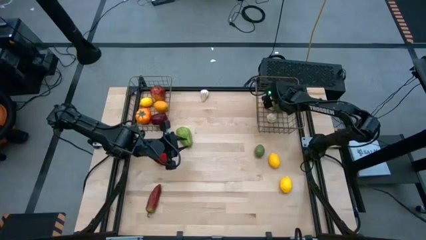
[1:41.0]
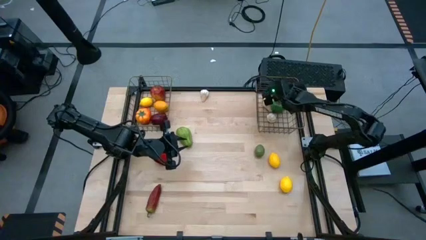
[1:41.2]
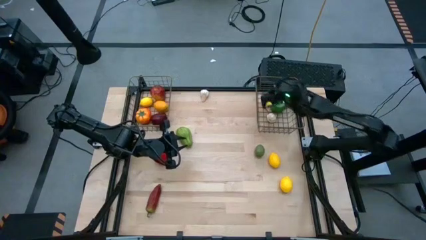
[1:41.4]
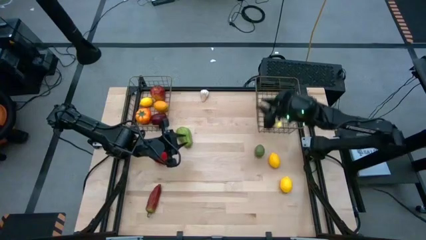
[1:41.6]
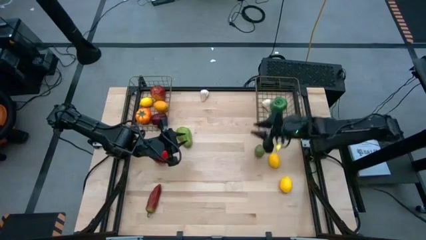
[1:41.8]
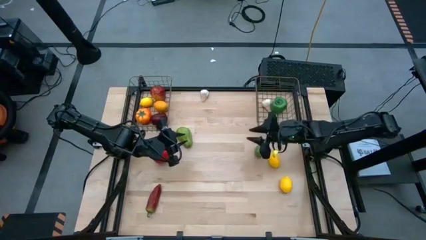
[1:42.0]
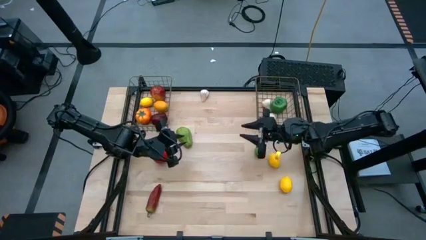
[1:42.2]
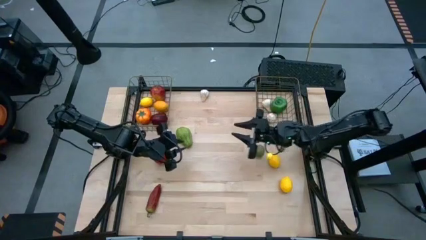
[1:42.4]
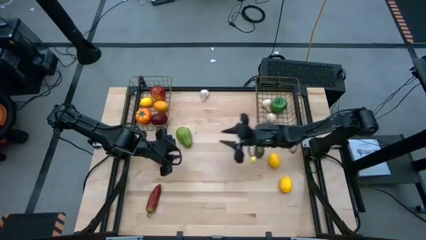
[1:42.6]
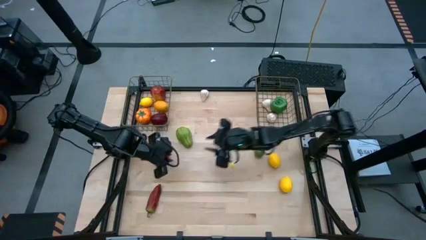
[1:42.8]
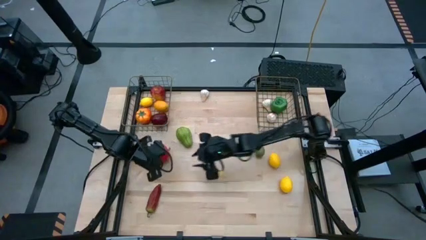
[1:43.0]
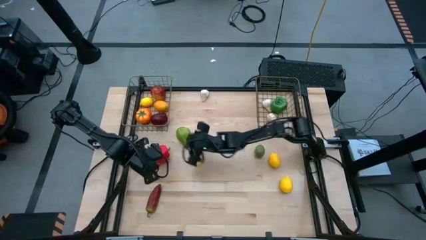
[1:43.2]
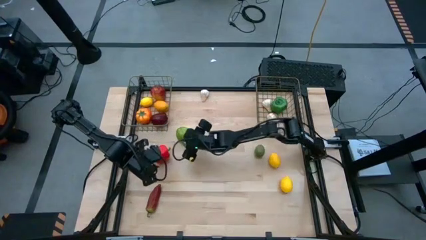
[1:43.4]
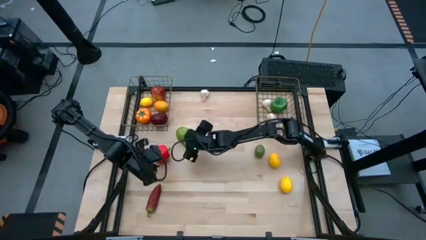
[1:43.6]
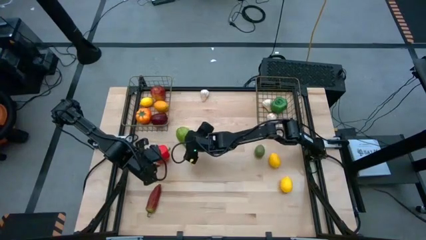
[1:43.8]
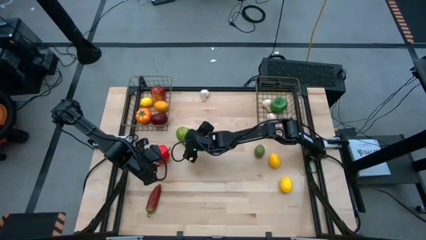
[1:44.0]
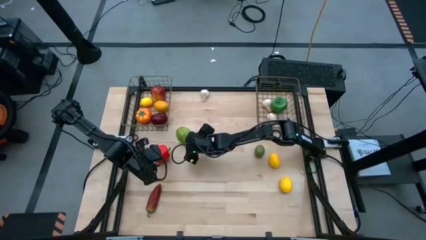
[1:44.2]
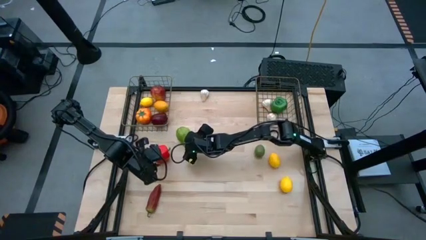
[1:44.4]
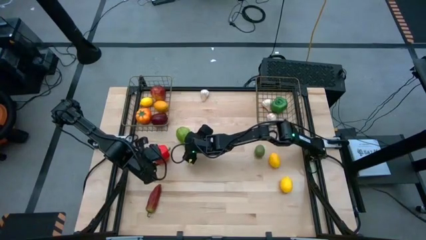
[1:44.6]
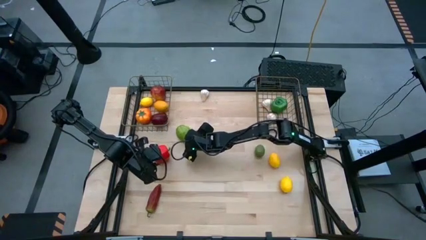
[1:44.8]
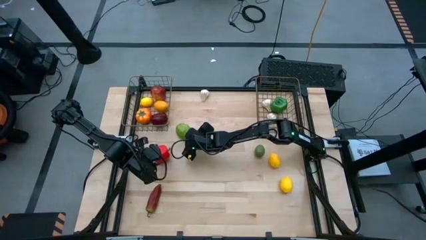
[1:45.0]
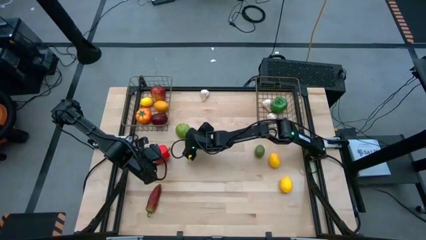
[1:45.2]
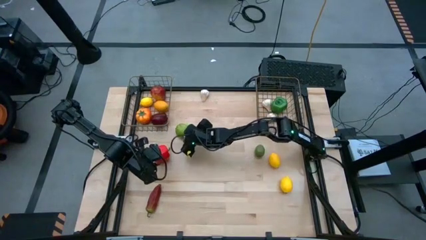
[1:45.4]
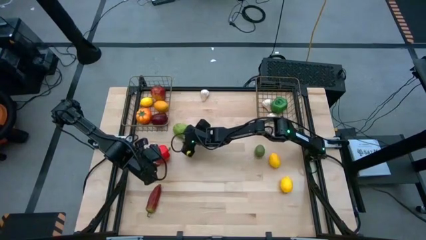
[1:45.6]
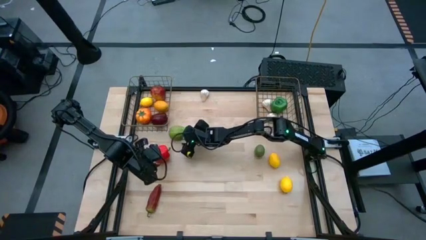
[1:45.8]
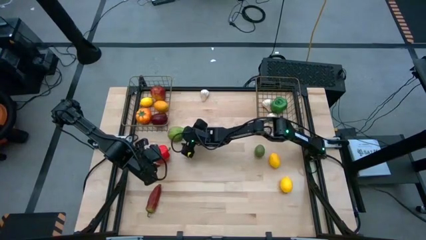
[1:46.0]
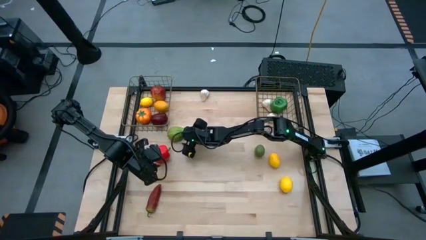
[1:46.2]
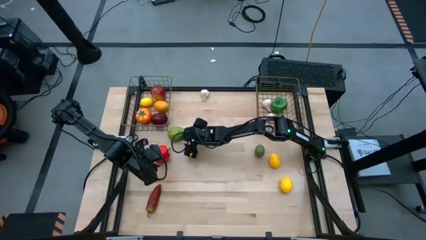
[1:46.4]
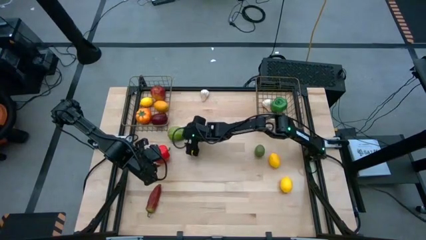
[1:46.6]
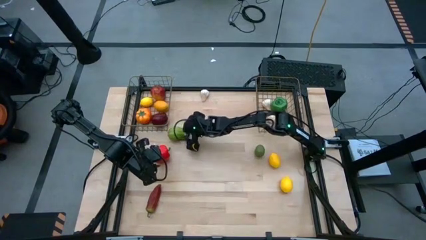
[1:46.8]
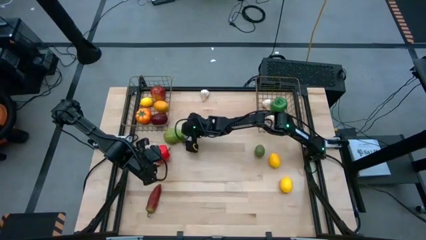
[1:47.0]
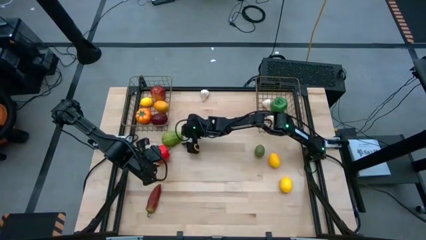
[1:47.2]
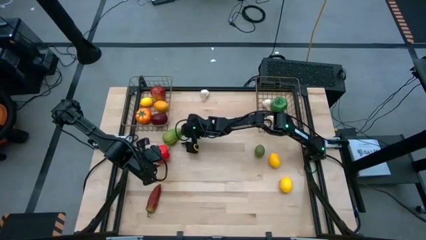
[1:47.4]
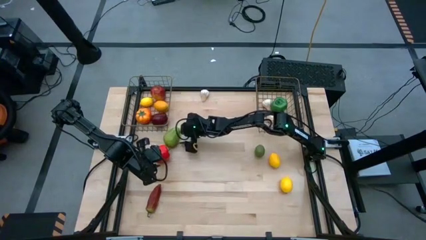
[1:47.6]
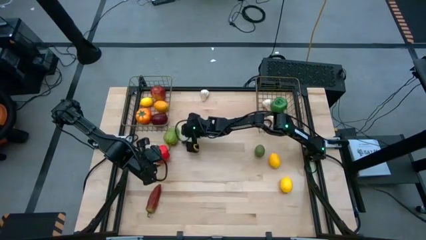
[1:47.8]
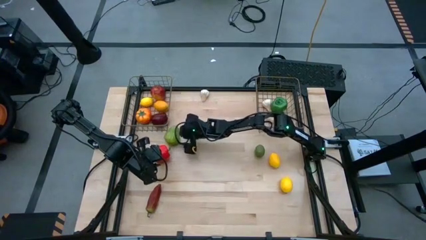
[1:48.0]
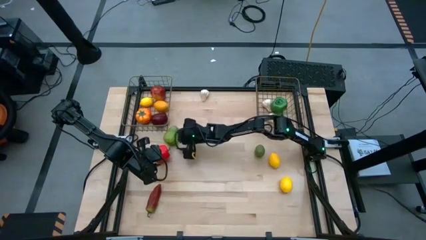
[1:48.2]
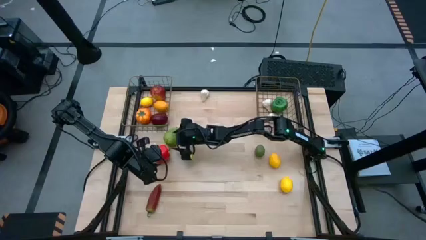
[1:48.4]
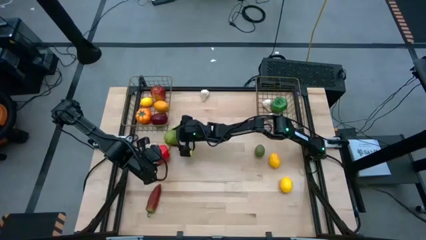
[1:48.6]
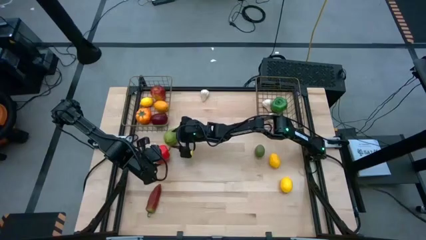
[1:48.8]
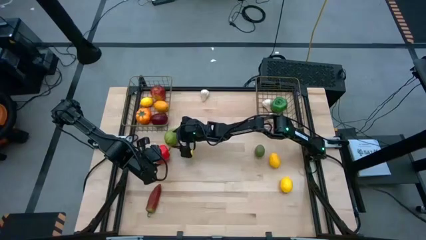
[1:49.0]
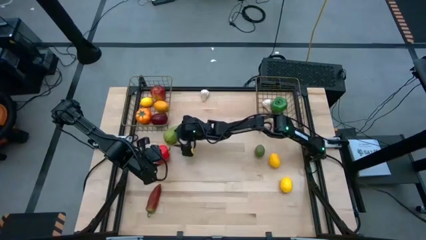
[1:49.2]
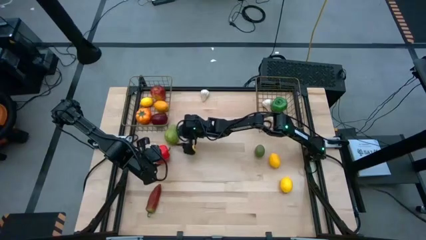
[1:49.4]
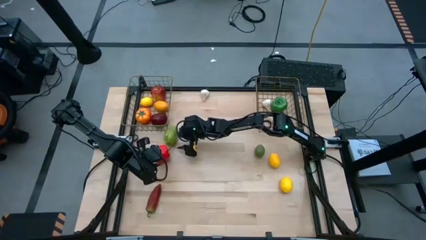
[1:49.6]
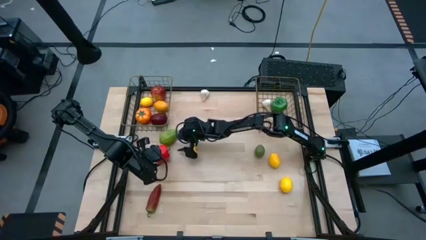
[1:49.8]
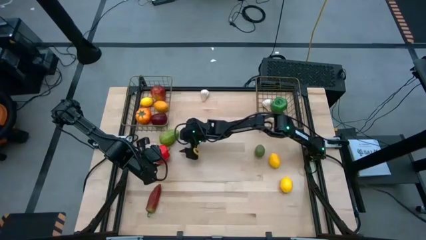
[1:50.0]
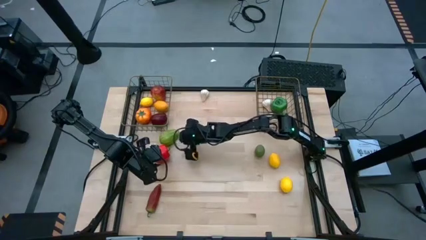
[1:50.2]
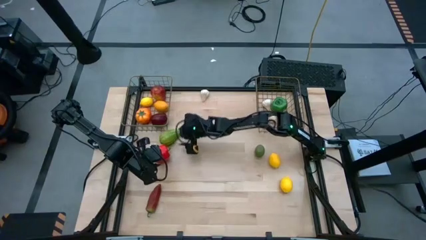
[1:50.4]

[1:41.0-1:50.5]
Task: Sort produce into baskets
Put the chayote into the right wire basket

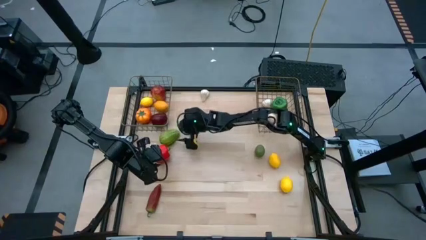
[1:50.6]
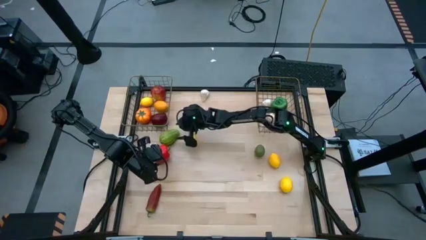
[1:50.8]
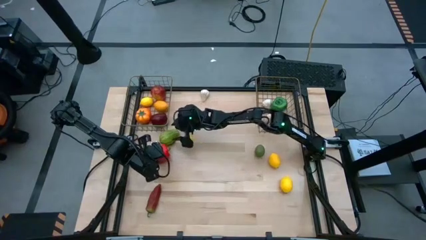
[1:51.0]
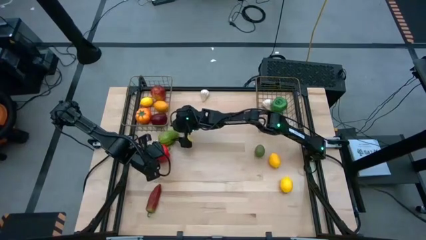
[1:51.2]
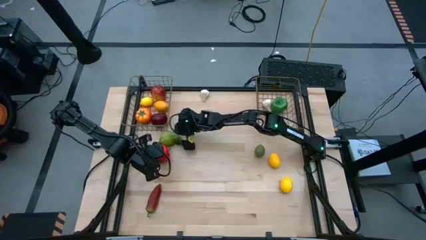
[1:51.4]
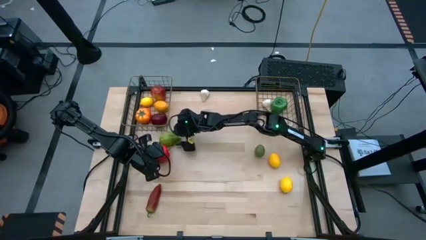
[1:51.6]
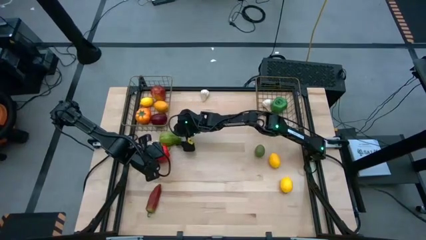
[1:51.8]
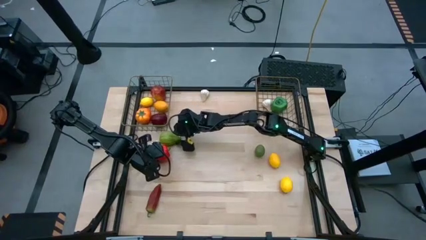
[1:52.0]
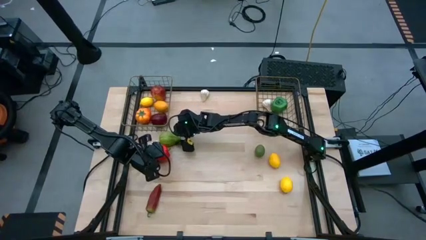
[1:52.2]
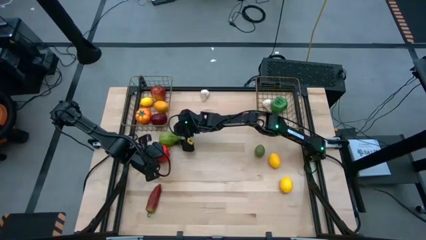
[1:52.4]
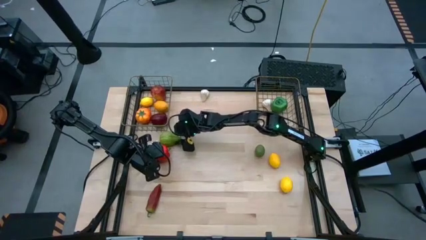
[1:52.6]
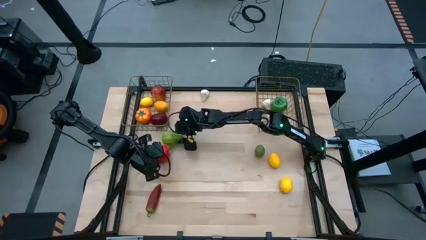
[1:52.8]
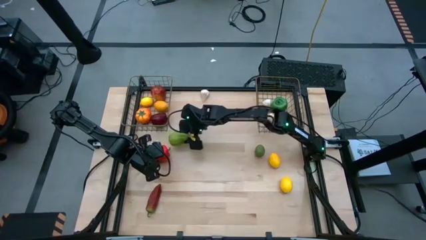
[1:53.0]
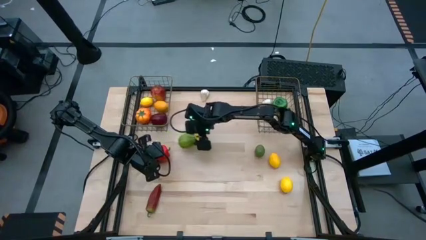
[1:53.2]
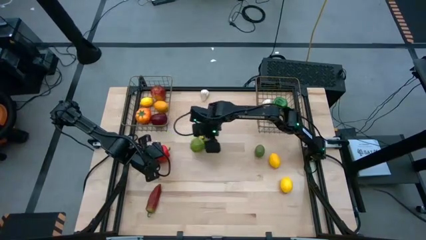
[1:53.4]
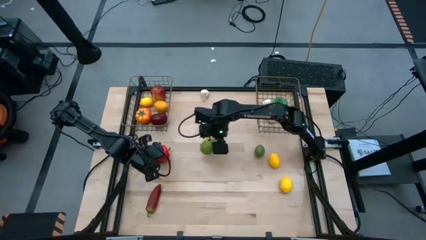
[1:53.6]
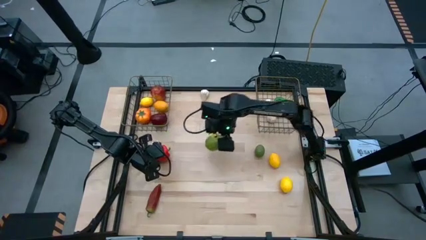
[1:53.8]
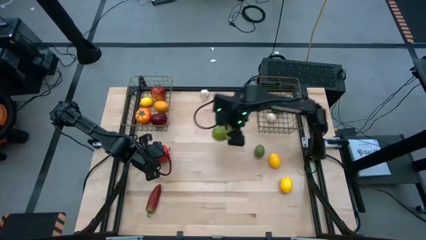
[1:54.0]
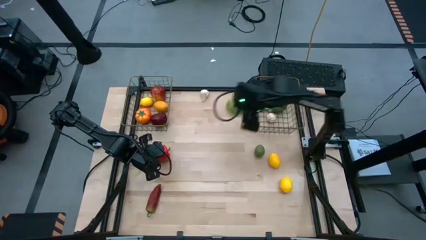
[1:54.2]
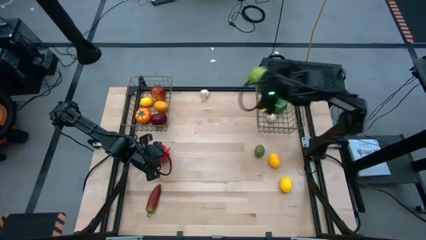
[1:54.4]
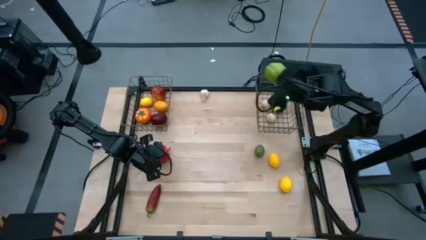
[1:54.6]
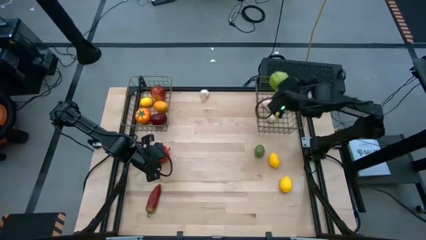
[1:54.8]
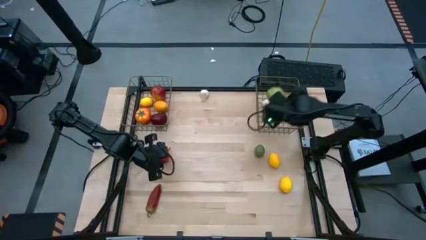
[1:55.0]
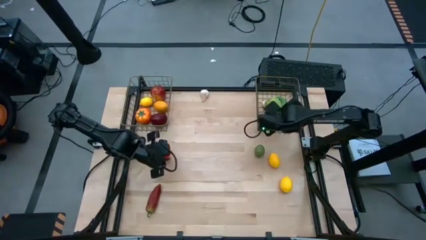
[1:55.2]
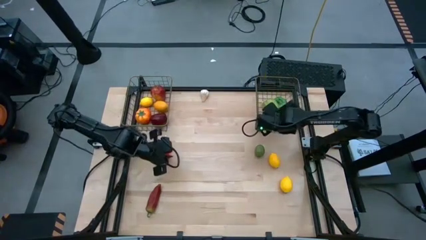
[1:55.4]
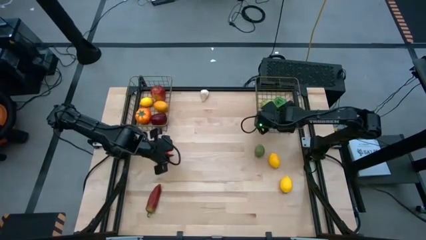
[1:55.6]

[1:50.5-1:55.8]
Put the chayote into the right wire basket
